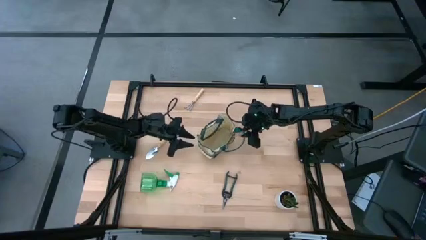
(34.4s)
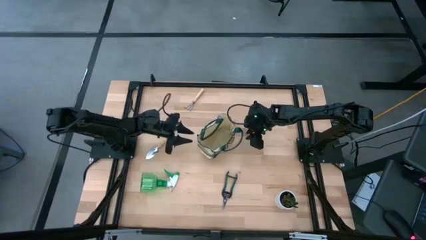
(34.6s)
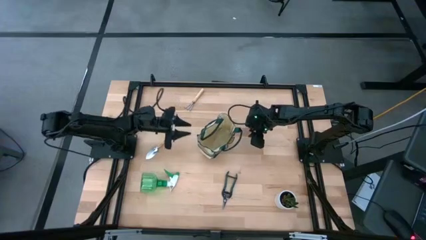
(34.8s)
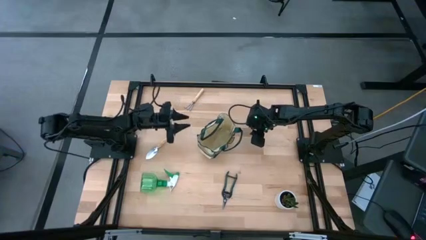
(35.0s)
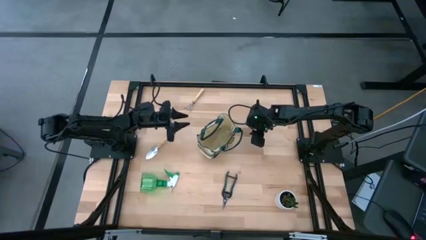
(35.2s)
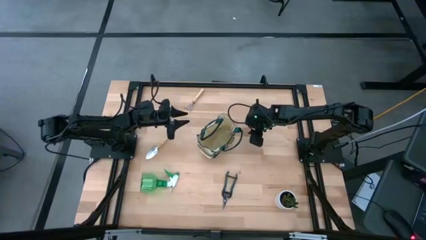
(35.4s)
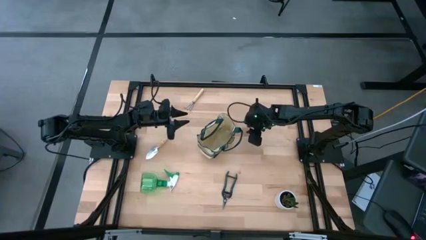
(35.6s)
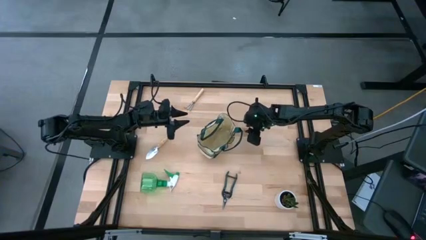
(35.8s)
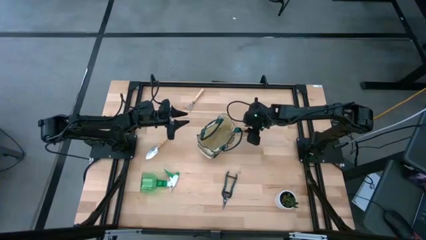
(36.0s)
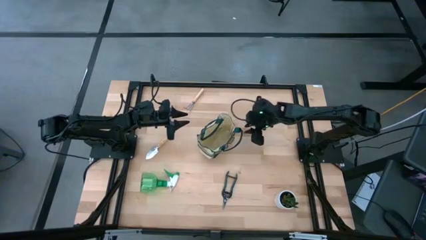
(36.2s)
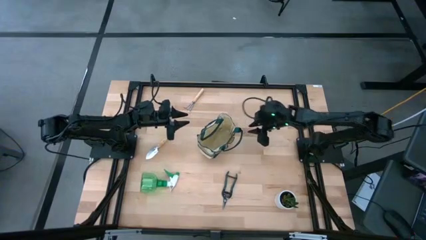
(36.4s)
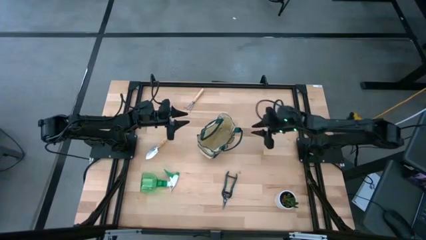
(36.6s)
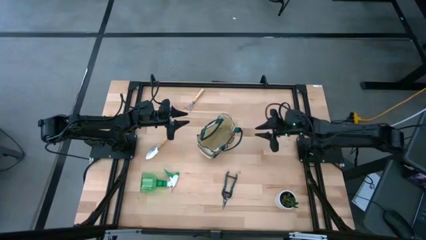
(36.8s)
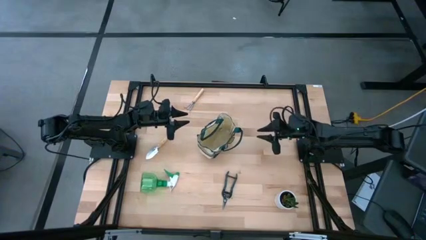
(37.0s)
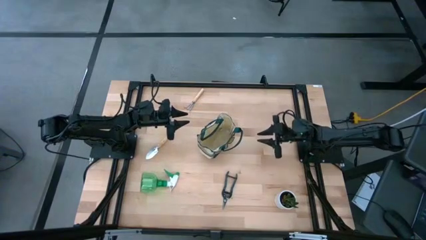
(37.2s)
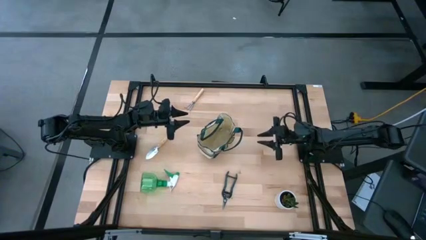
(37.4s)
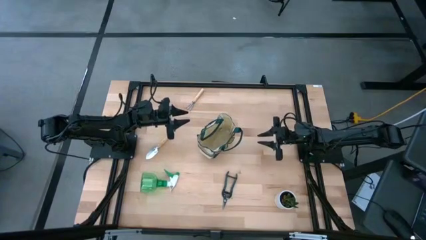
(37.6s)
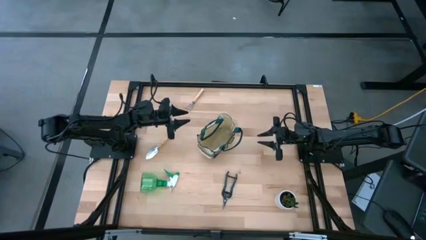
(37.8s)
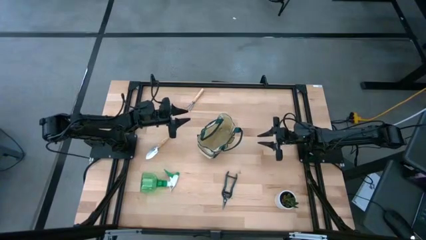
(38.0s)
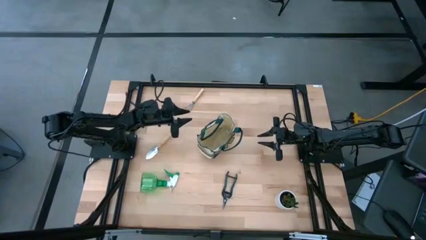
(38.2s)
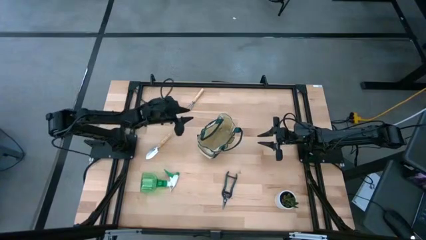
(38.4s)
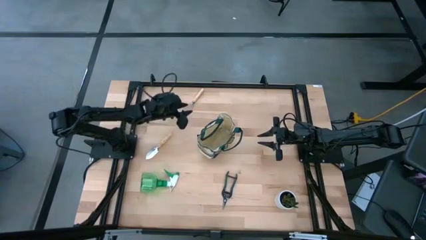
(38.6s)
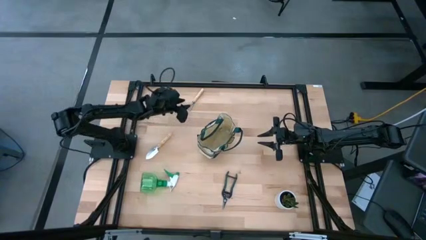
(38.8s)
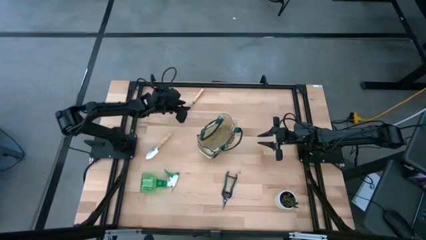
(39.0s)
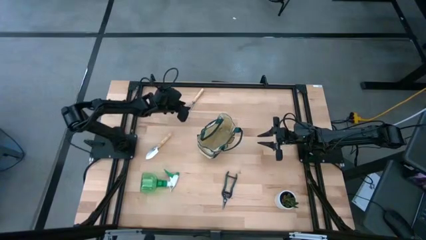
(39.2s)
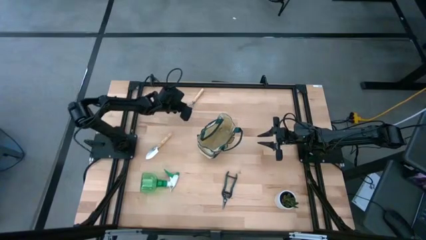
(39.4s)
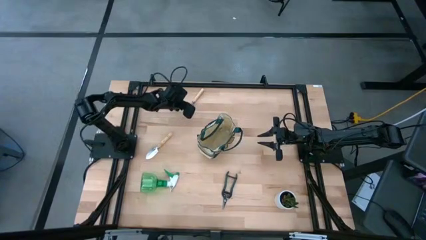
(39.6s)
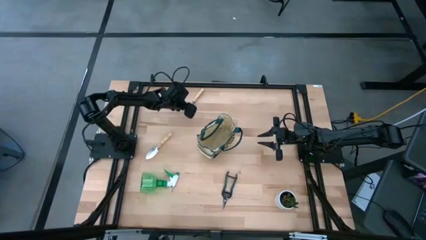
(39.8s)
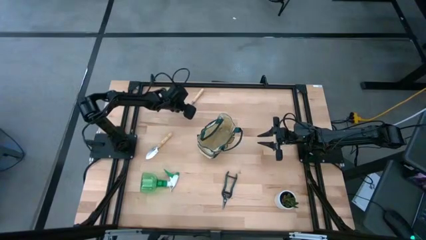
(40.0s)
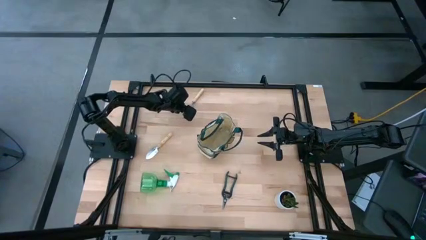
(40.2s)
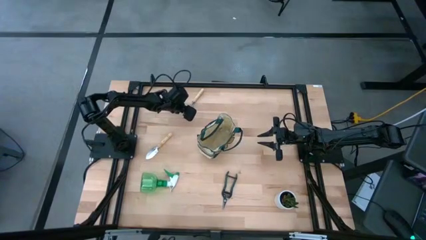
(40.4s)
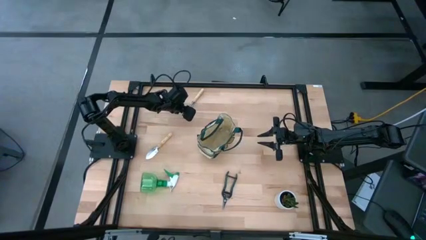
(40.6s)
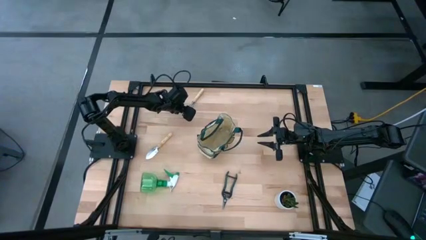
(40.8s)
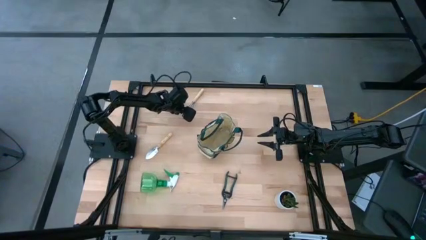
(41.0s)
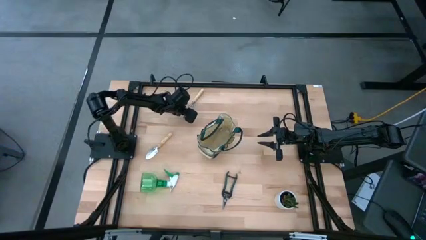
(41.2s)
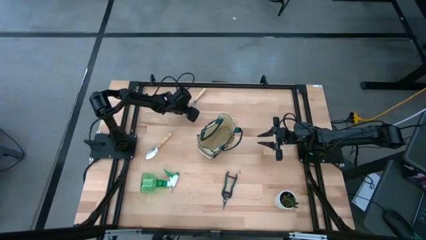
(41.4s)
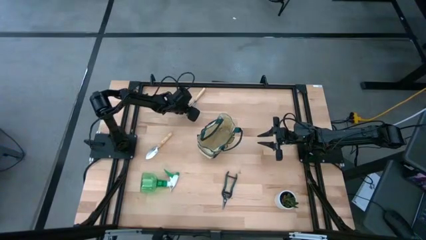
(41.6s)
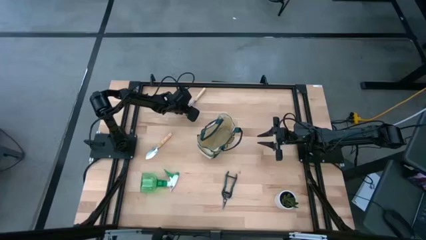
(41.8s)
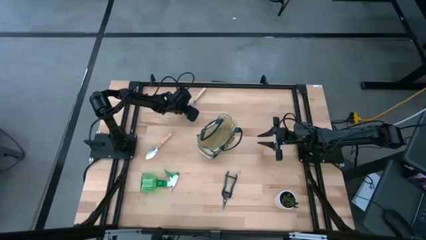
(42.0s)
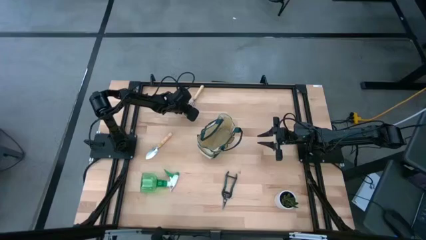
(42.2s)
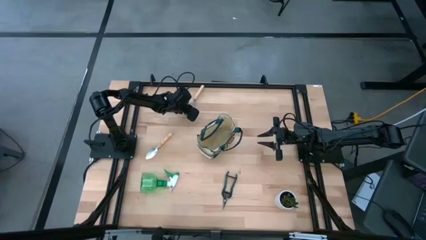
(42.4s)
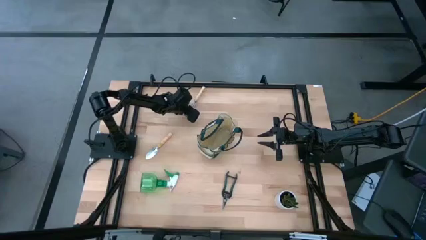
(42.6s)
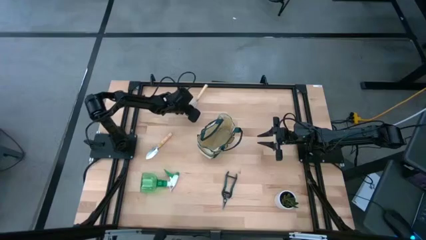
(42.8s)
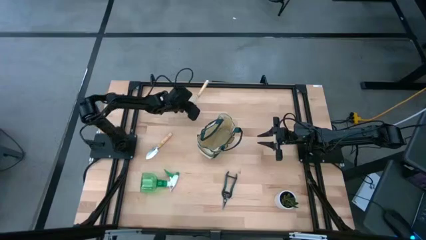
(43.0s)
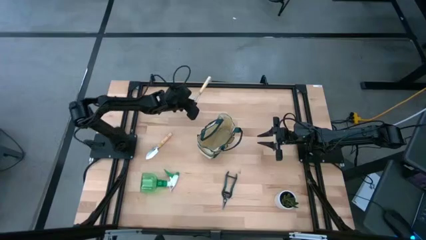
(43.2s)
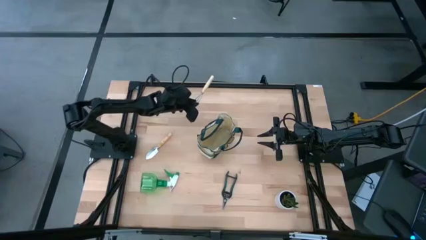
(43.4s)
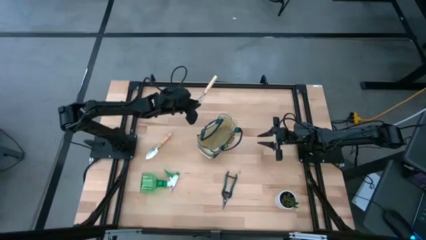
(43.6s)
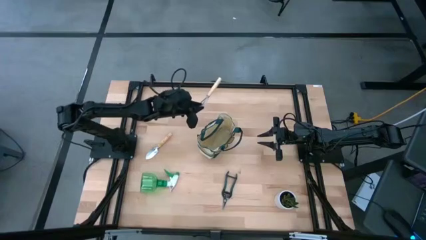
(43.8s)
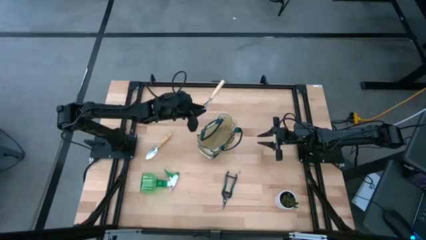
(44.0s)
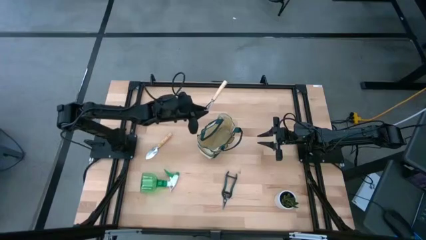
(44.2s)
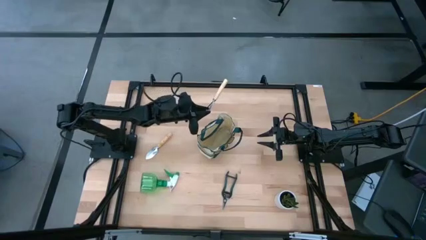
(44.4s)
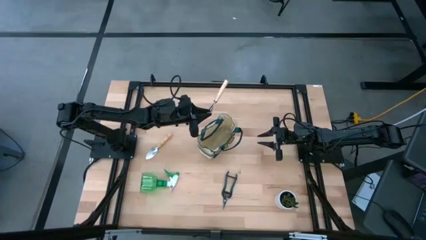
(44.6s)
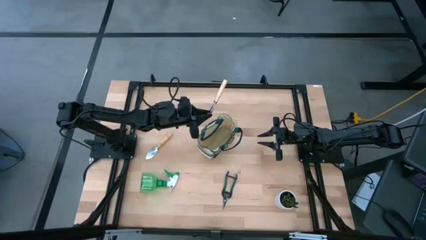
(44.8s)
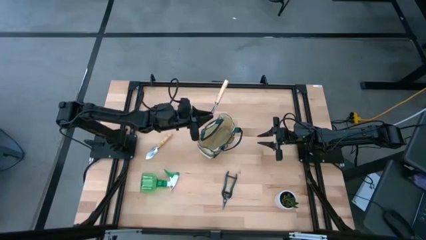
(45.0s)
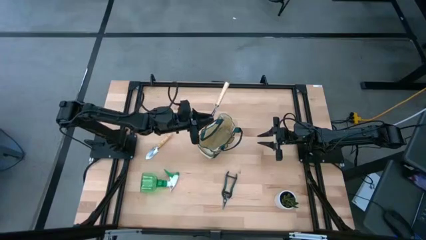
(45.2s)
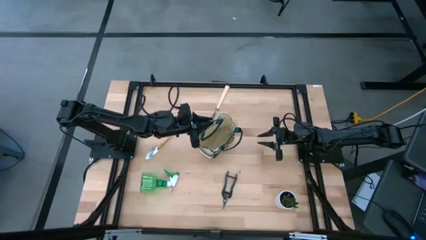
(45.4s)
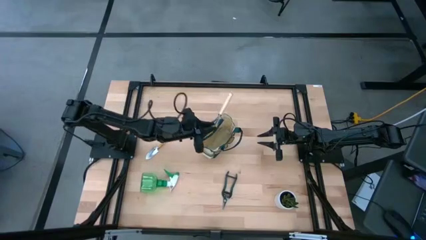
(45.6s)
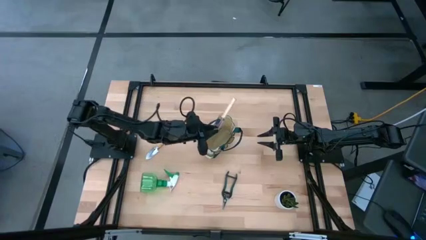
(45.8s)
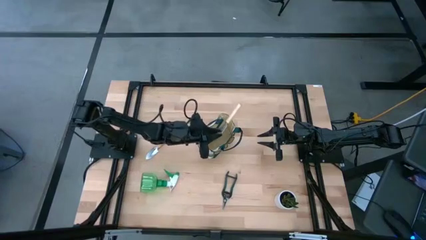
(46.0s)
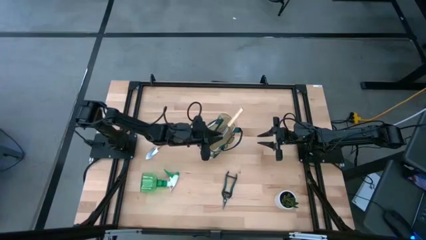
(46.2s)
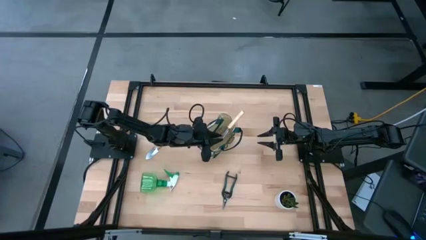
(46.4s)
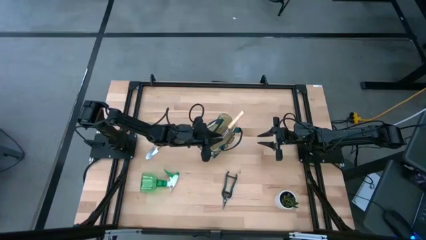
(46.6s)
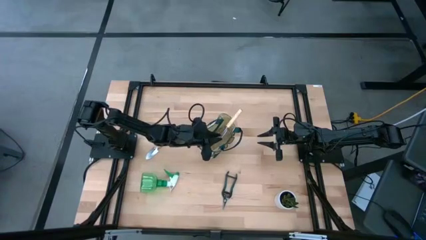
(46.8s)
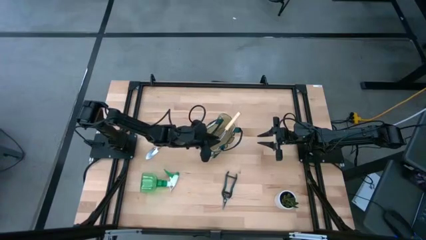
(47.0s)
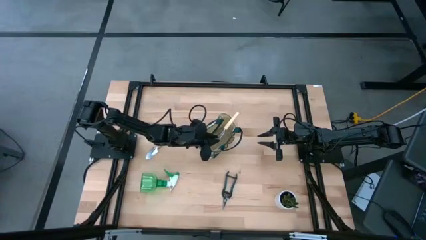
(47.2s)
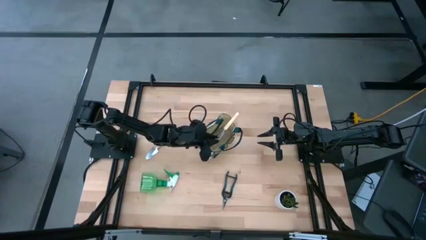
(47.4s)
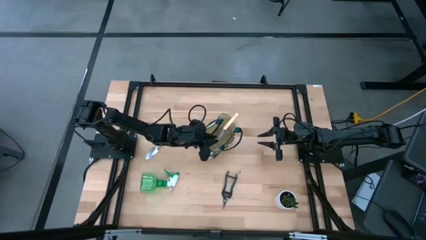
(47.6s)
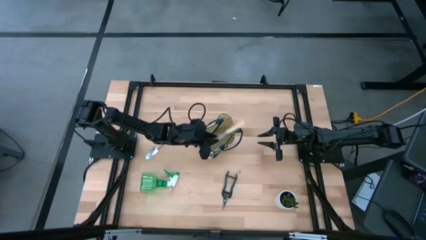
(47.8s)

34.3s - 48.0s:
Task: Pick & Place Garden tools in Gardening bag
Put the hand rake into the gardening bag

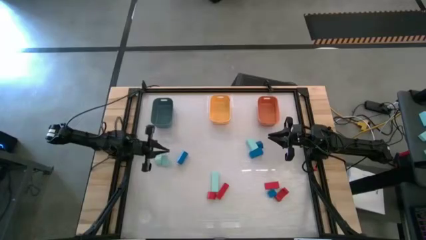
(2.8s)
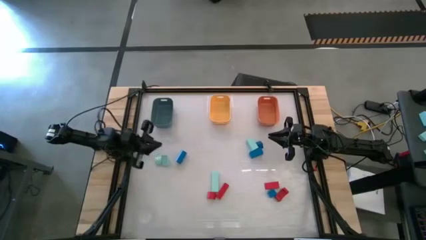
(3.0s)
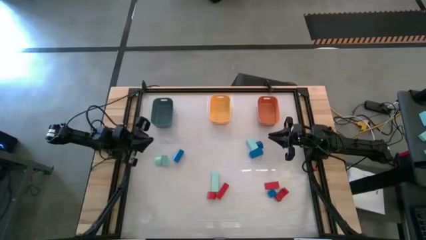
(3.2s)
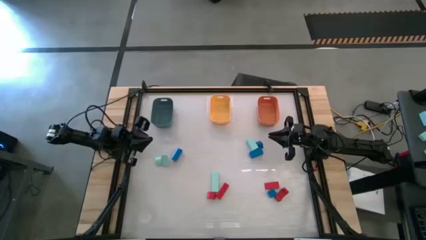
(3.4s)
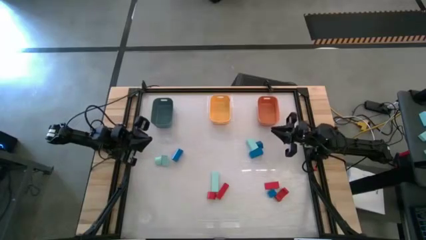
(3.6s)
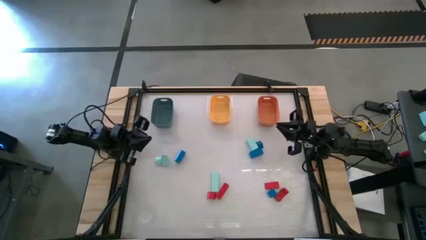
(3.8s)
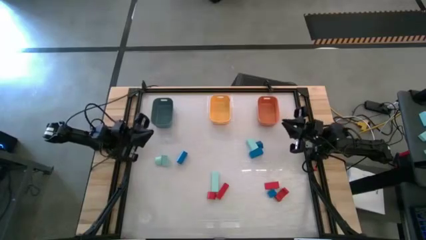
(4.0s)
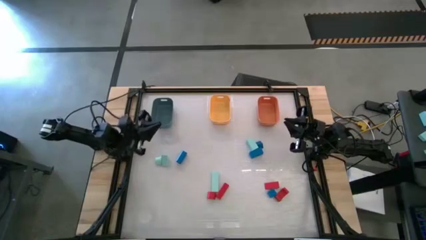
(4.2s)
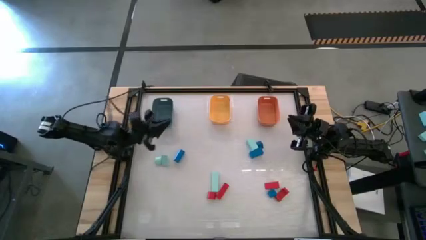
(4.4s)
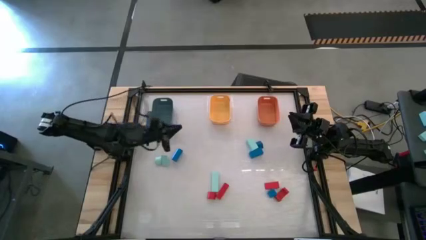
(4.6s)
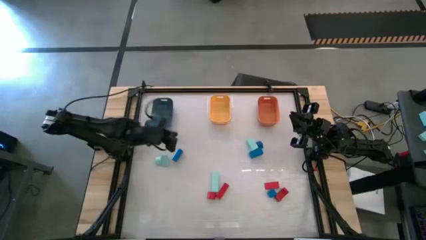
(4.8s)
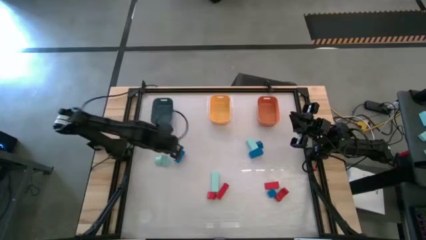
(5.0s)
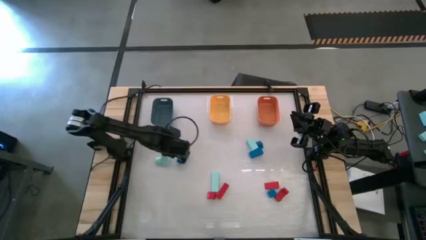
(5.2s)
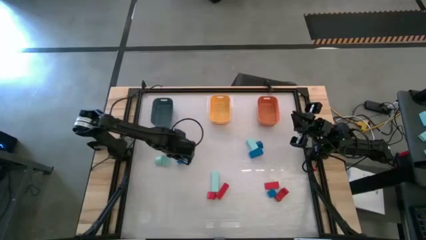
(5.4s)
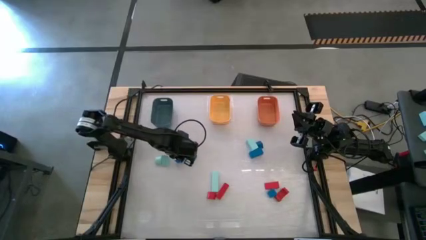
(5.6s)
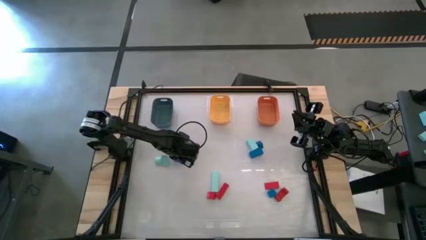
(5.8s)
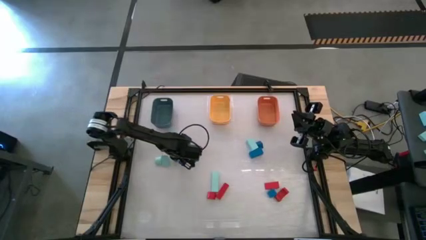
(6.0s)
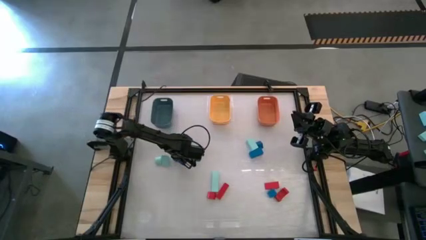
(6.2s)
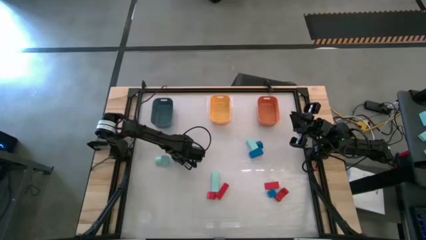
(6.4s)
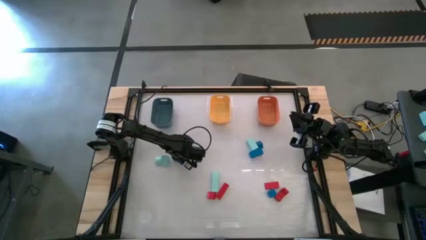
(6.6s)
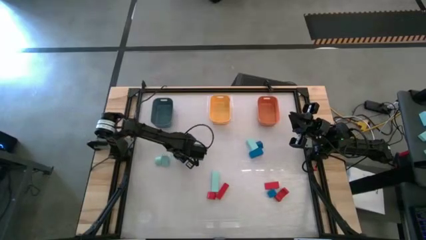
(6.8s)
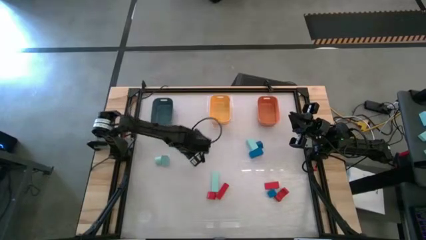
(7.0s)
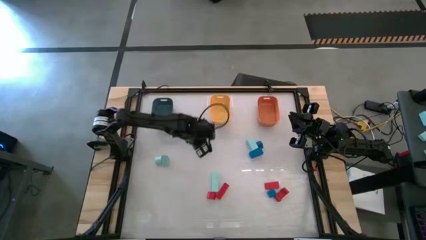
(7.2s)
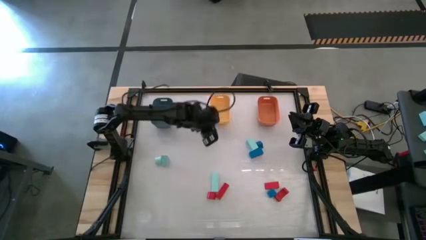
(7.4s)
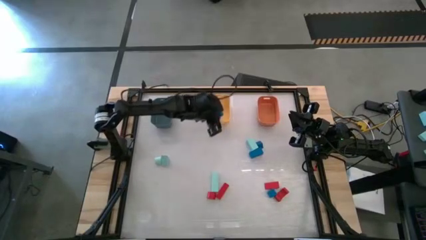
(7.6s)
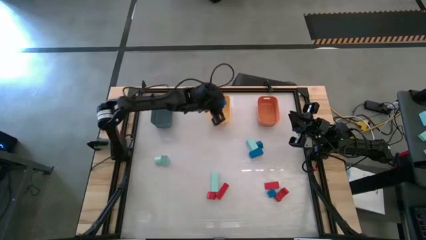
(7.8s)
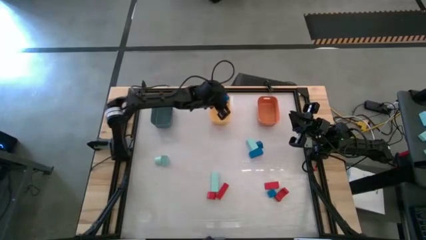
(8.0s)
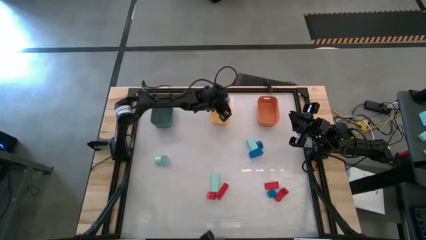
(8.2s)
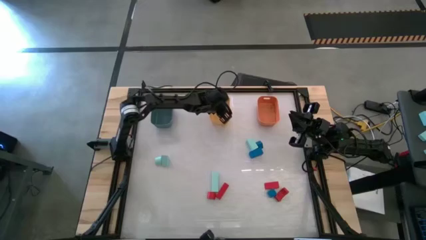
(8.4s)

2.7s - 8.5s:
Task: Sort & place blocks by color
Put the blue block into the yellow bin
